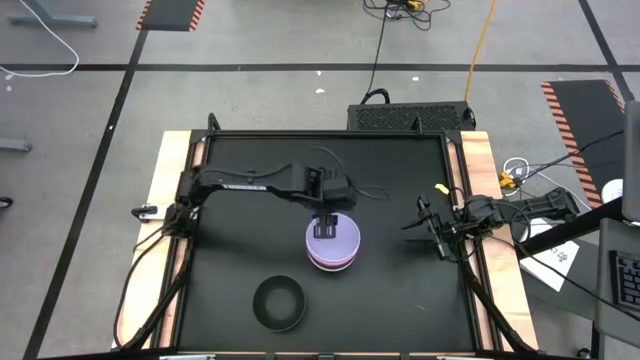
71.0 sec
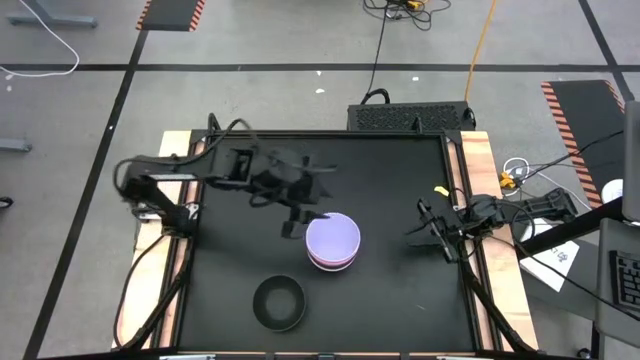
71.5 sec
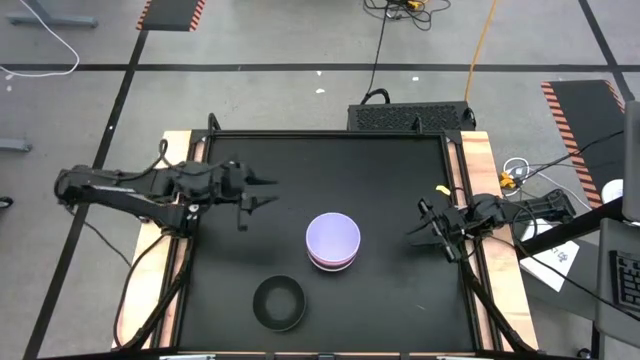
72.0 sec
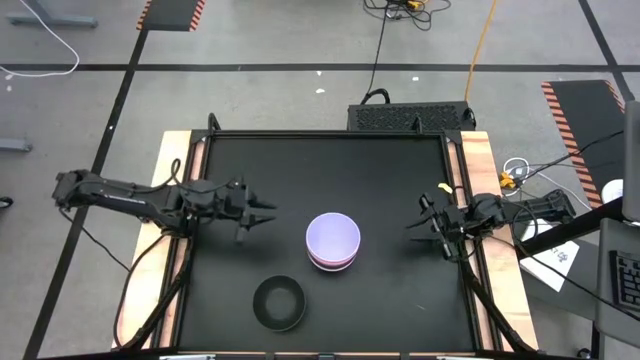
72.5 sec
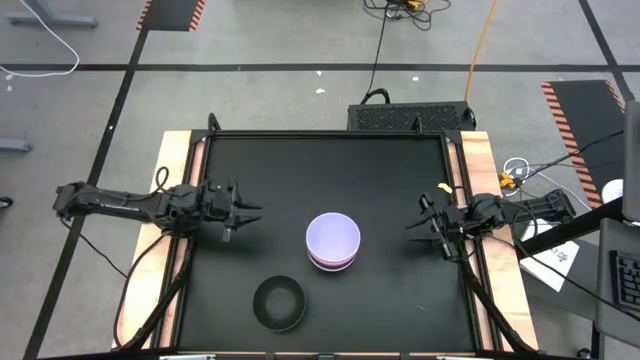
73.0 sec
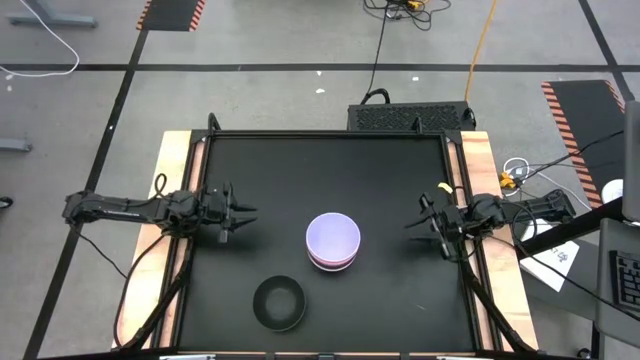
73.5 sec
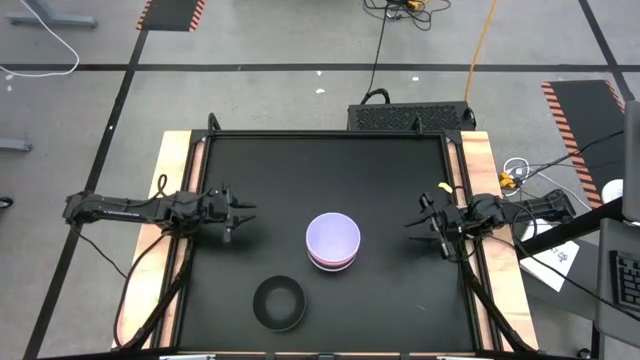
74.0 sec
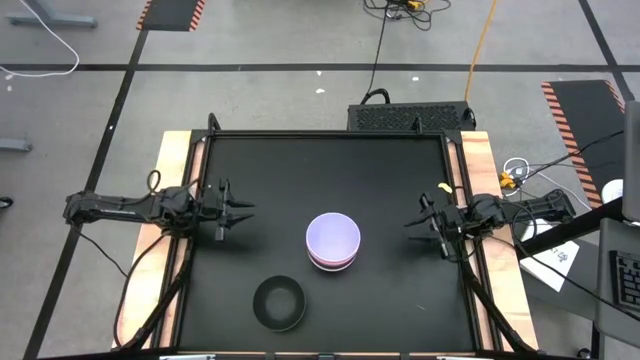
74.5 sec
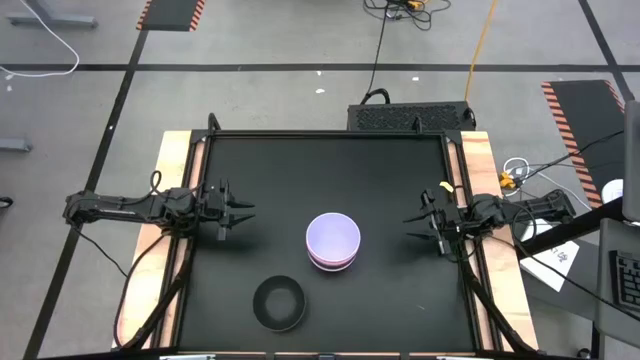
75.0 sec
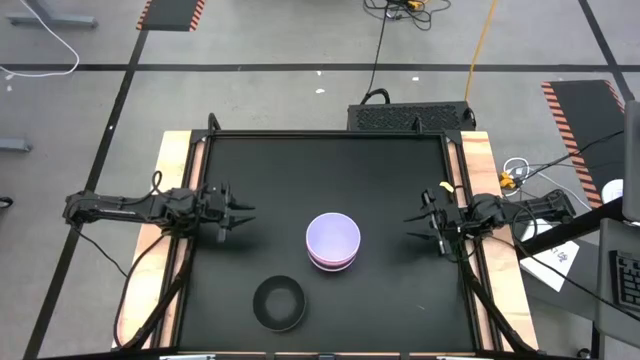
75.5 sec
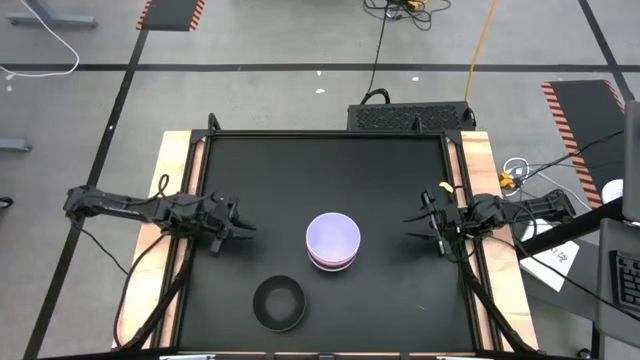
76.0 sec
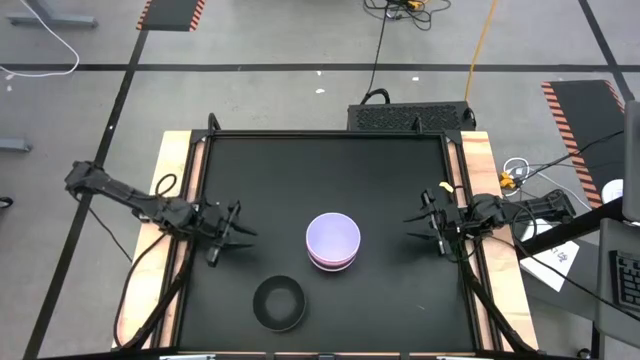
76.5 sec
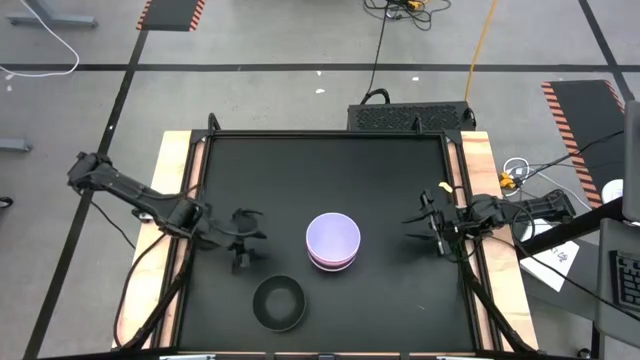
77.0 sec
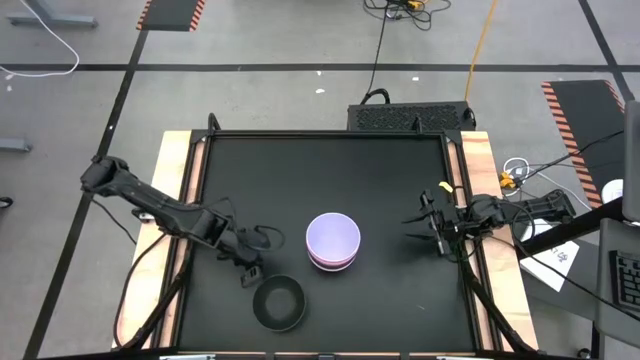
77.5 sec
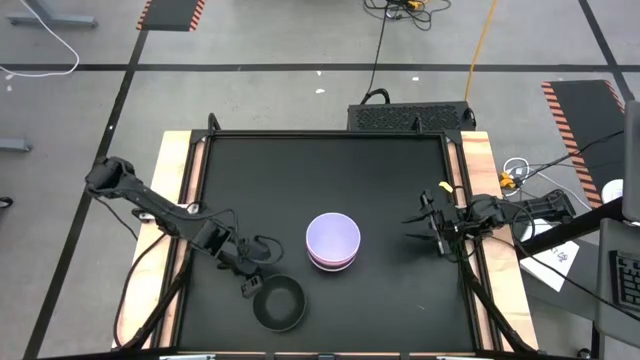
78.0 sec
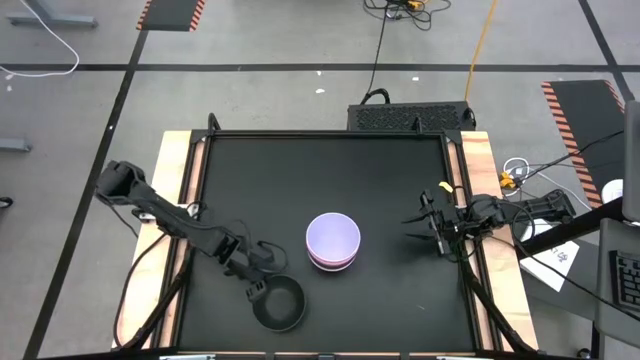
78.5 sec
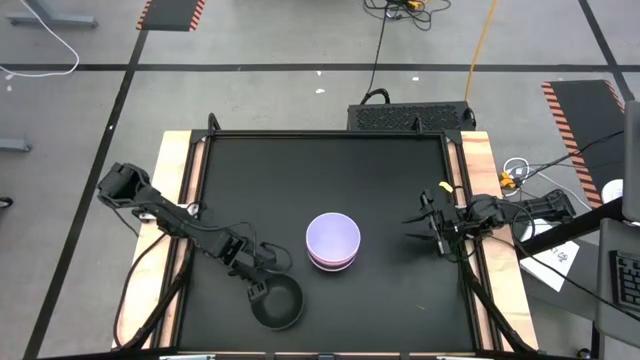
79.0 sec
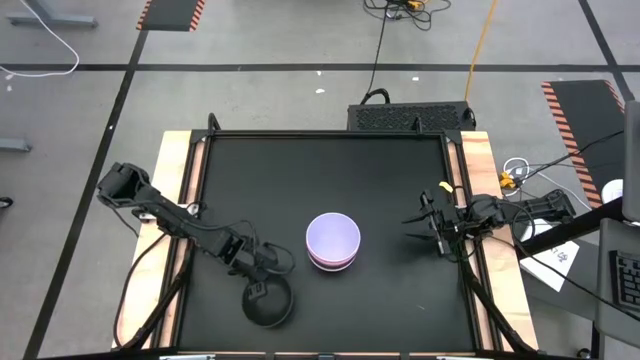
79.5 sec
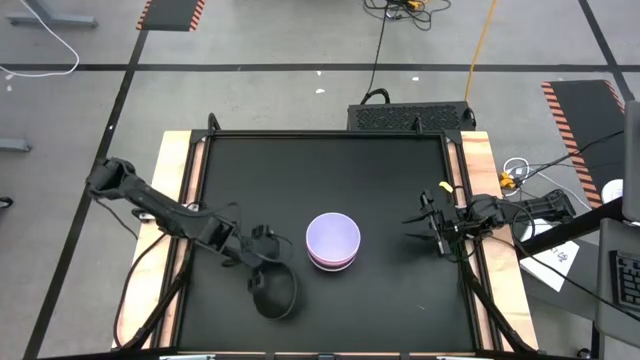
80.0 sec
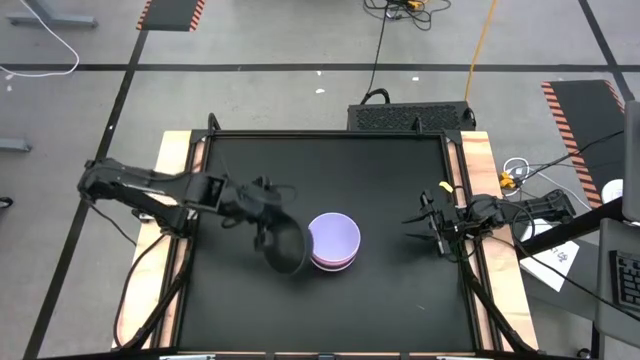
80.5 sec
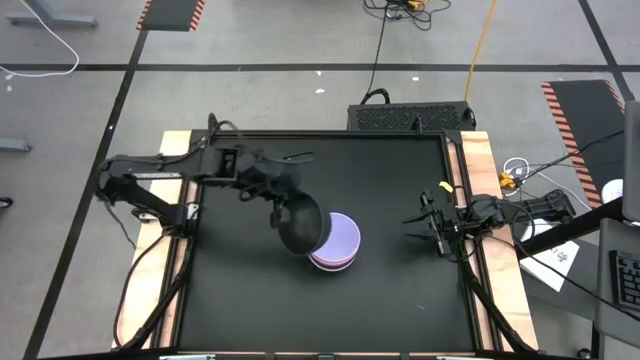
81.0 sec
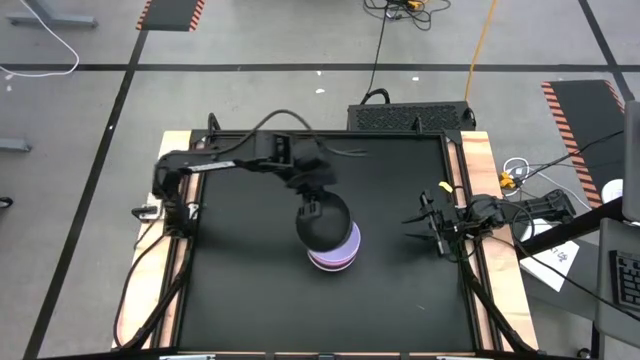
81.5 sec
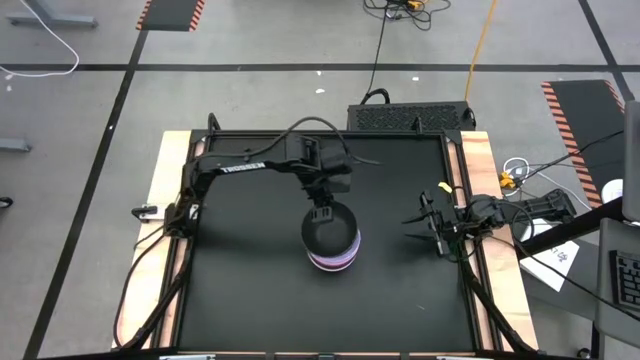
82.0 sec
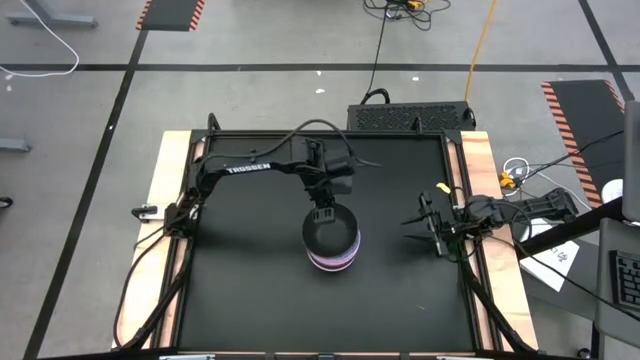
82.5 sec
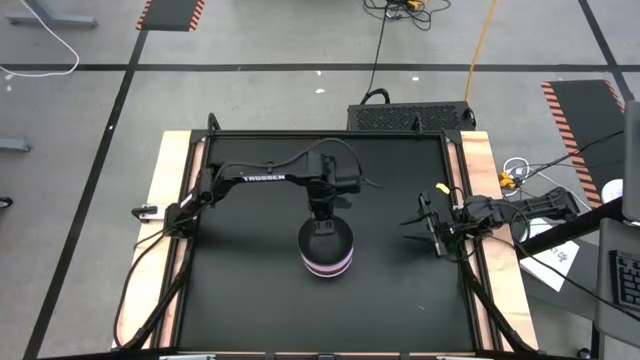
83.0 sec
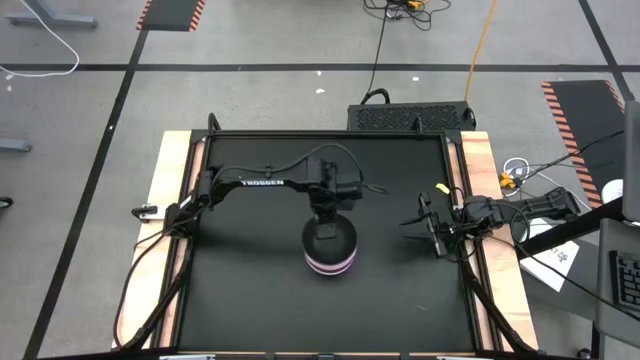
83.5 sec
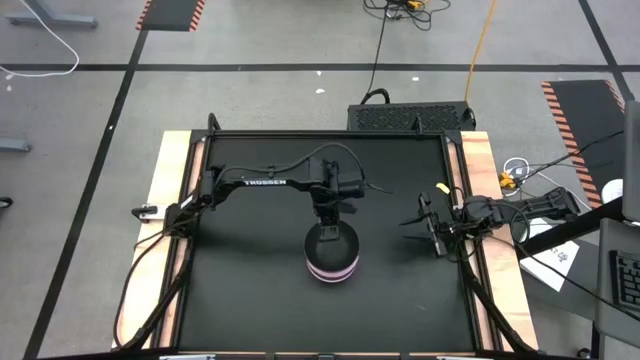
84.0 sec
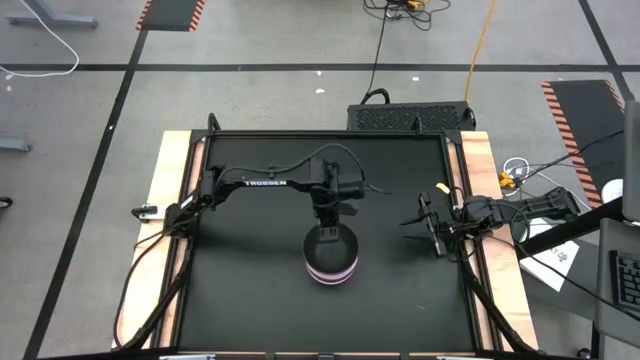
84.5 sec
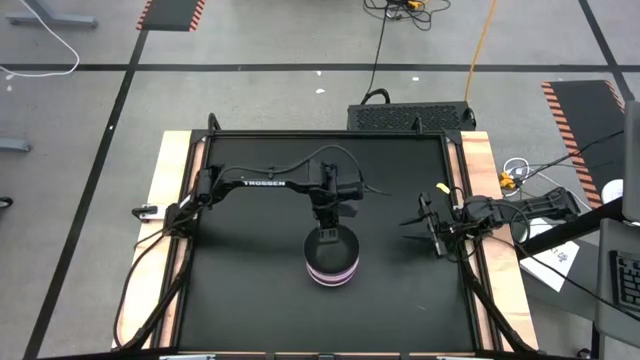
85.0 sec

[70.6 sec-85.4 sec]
Task: Nest bowls inside each other
Stack the black bowl into the purple bowl

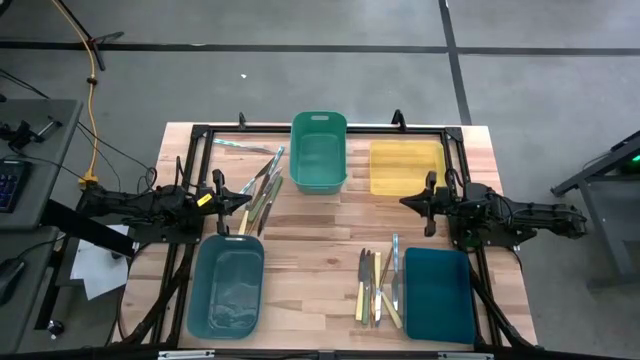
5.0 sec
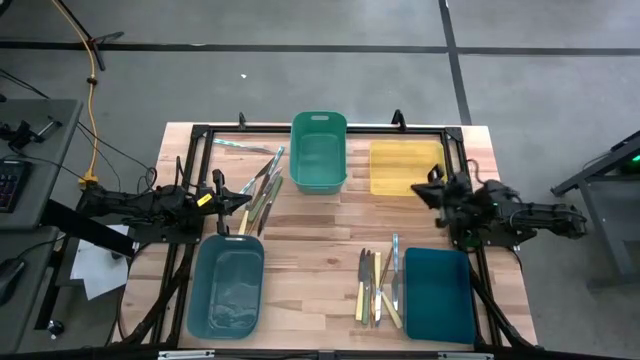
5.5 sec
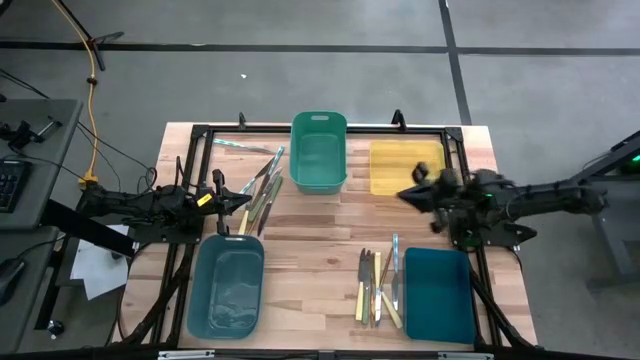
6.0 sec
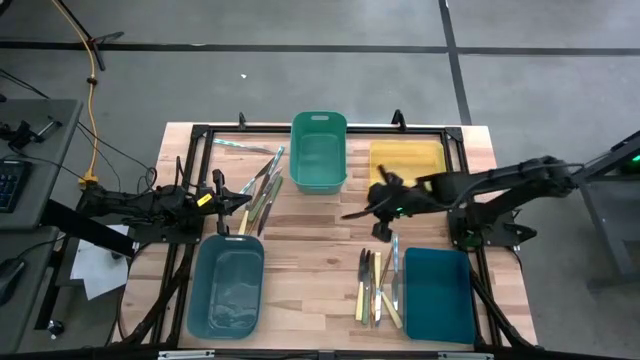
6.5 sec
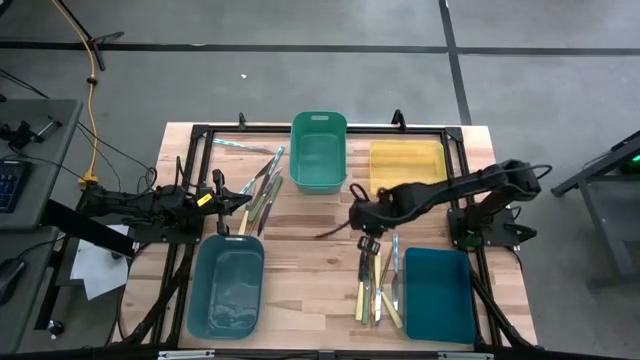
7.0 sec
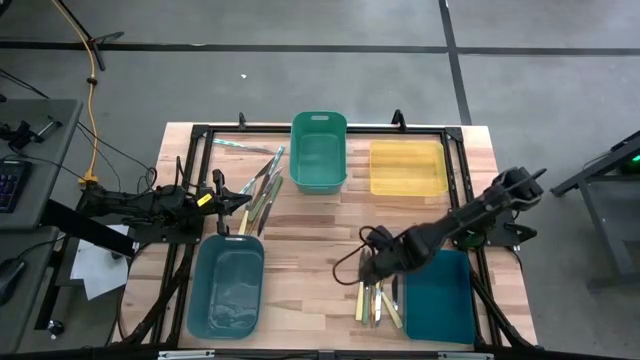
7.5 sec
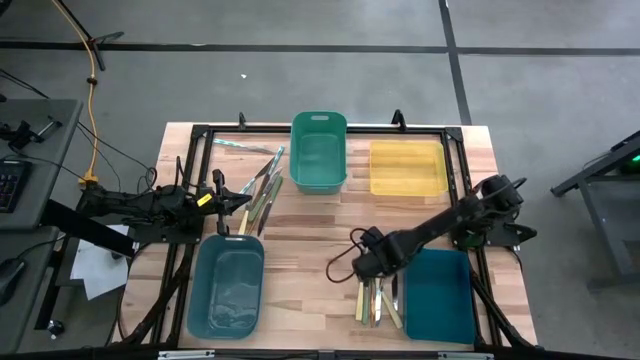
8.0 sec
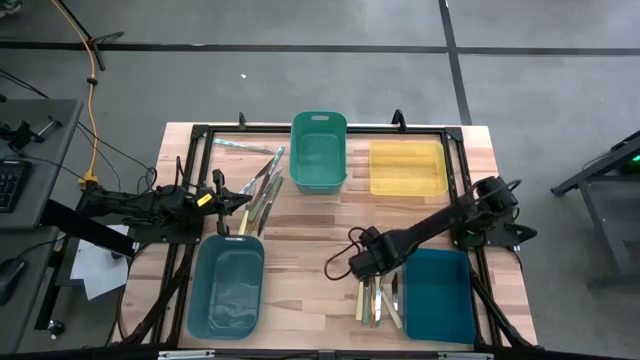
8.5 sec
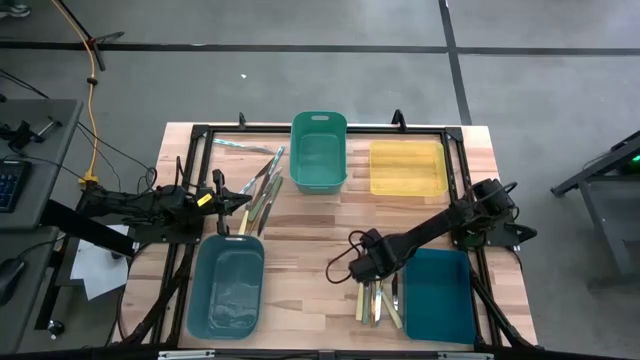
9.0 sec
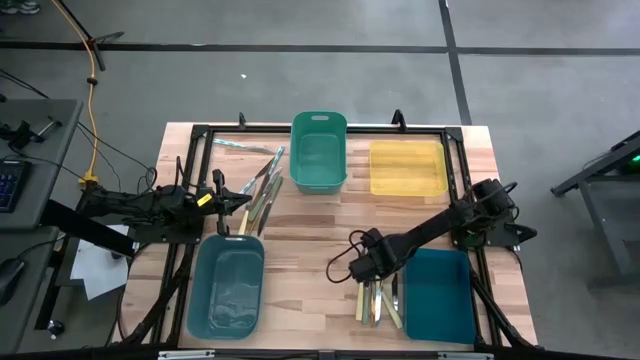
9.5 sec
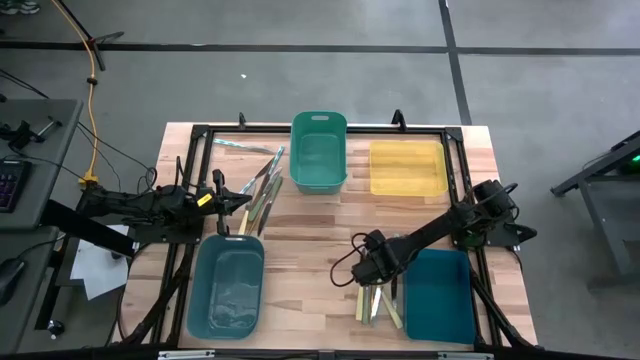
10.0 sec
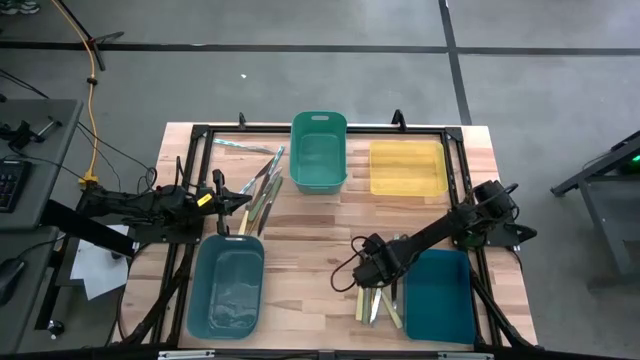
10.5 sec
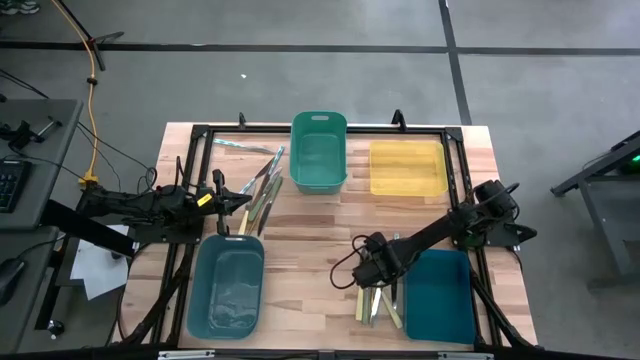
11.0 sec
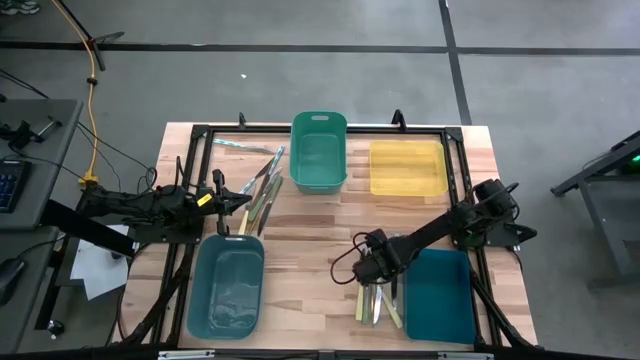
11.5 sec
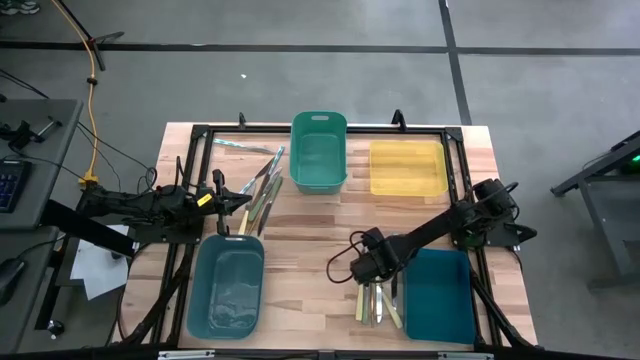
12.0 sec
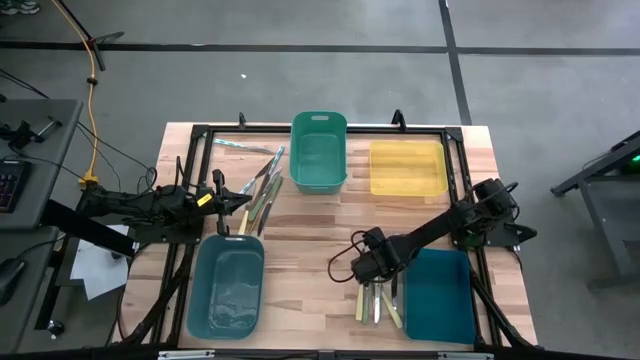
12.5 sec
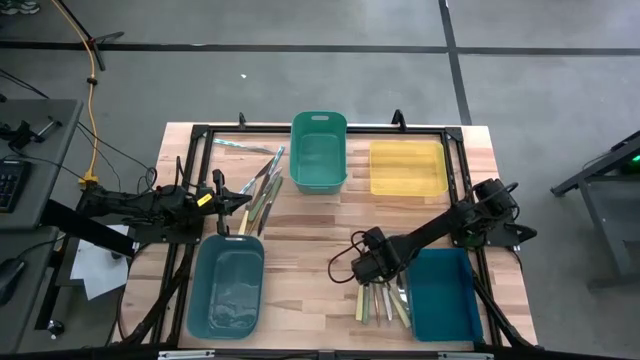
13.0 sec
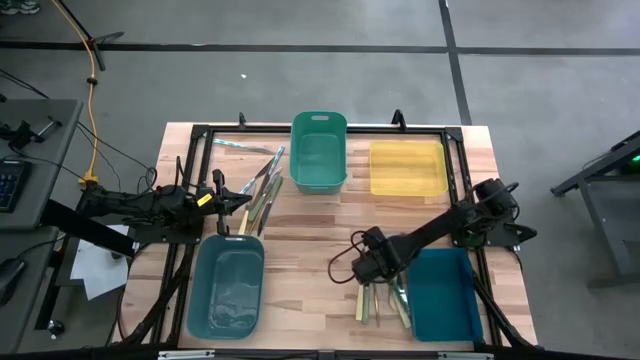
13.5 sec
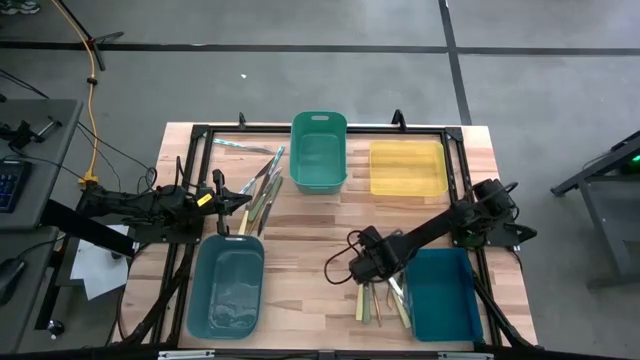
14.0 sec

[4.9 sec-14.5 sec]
Task: Sort silverware by color (type)
Put the yellow knife into the green bin
